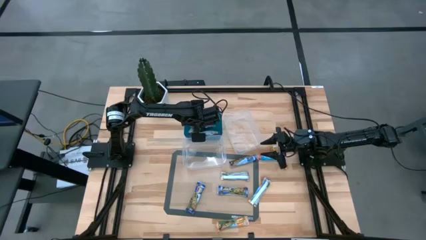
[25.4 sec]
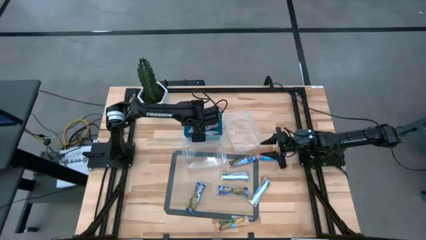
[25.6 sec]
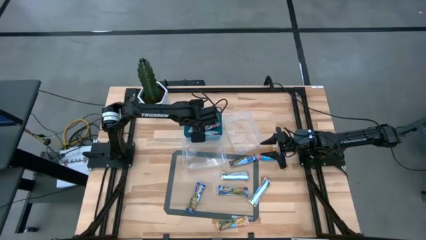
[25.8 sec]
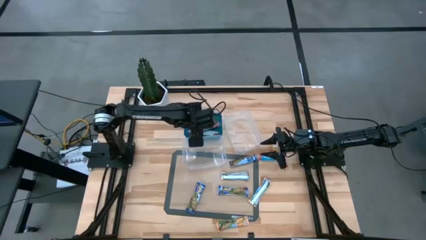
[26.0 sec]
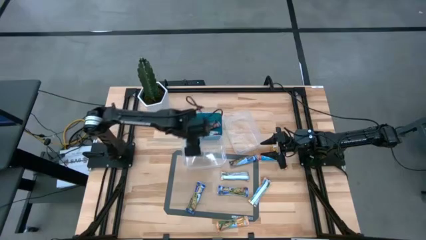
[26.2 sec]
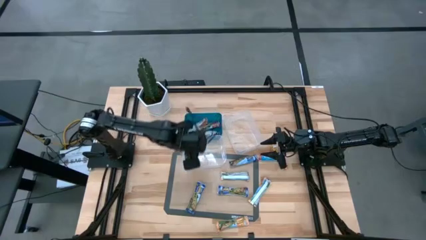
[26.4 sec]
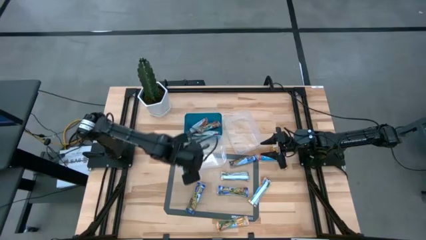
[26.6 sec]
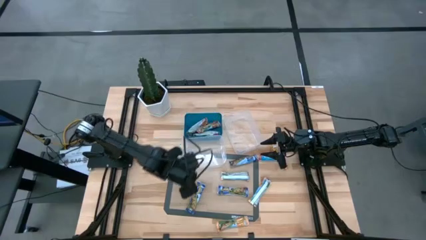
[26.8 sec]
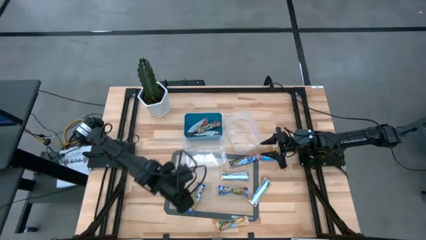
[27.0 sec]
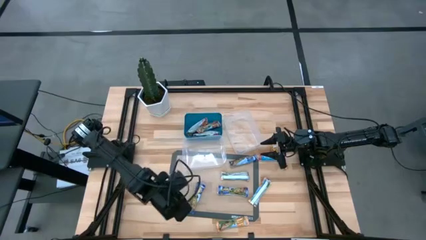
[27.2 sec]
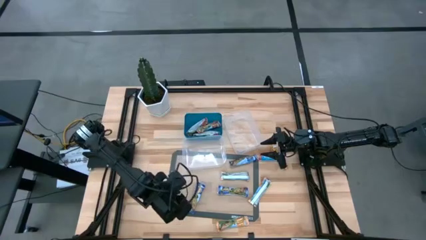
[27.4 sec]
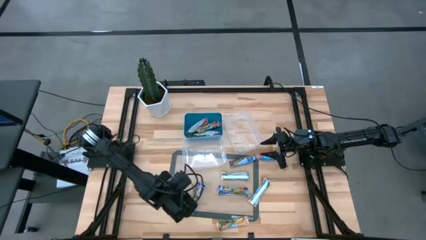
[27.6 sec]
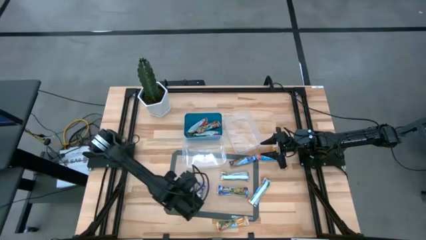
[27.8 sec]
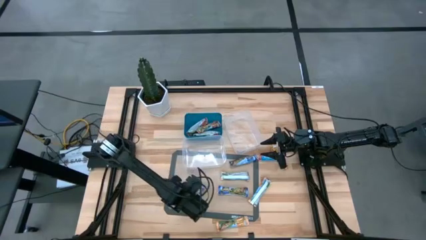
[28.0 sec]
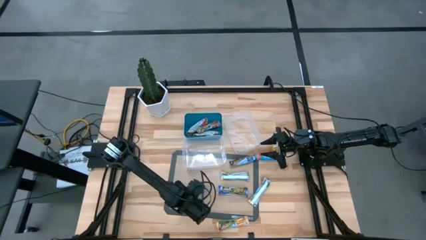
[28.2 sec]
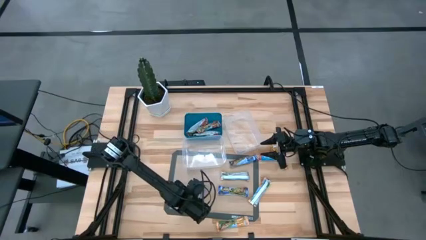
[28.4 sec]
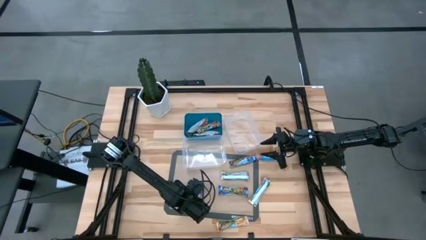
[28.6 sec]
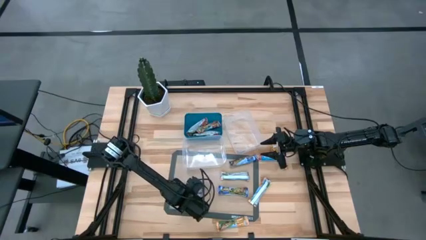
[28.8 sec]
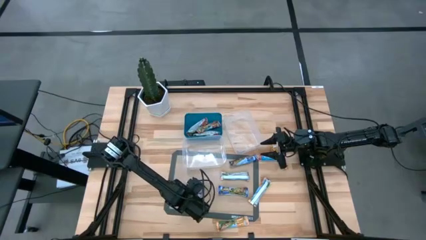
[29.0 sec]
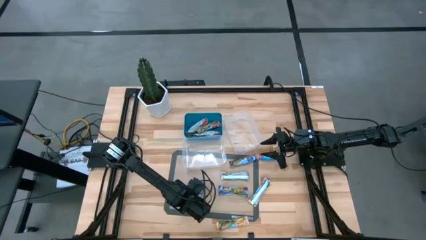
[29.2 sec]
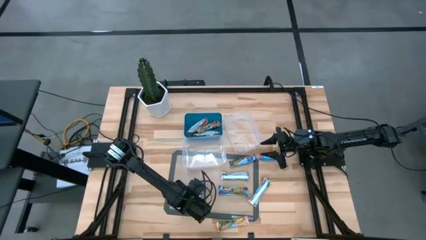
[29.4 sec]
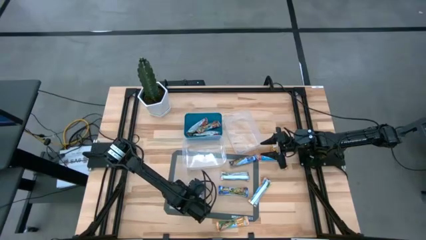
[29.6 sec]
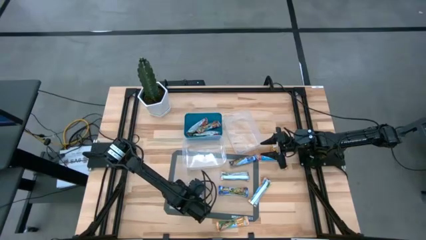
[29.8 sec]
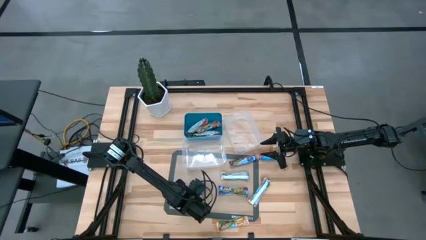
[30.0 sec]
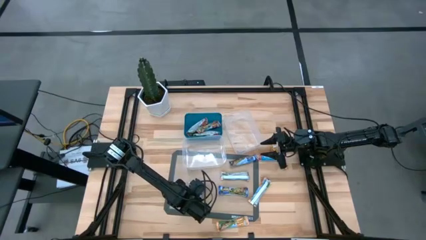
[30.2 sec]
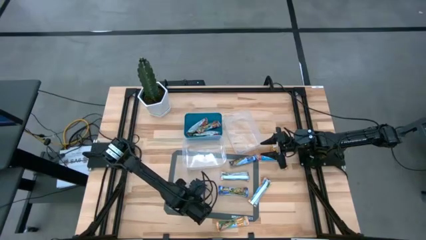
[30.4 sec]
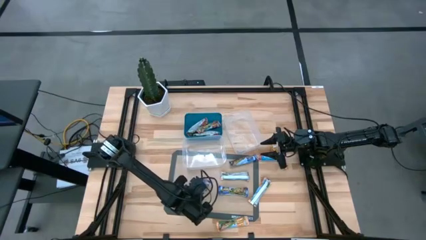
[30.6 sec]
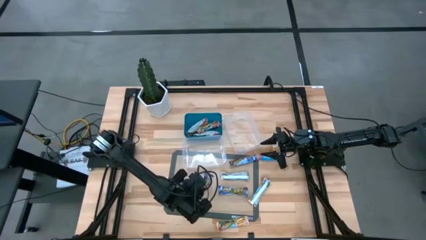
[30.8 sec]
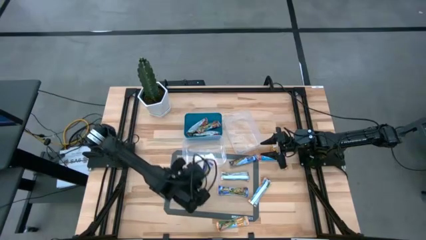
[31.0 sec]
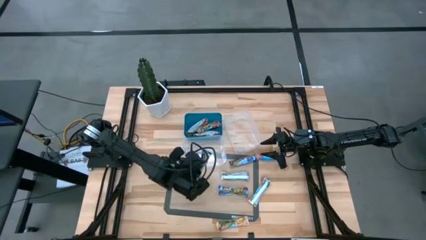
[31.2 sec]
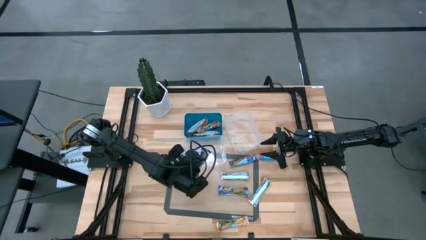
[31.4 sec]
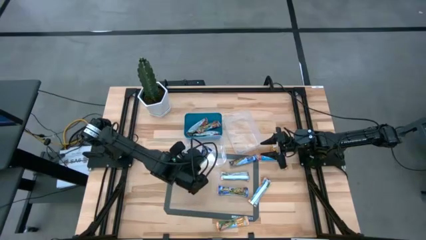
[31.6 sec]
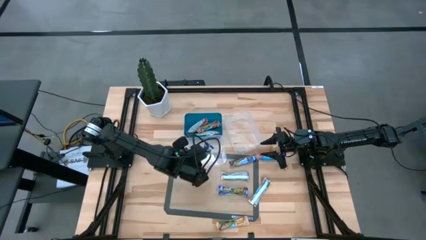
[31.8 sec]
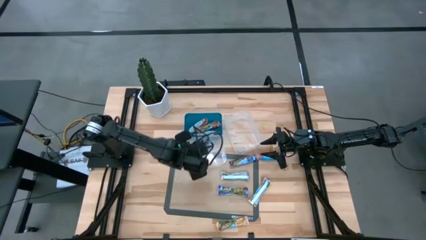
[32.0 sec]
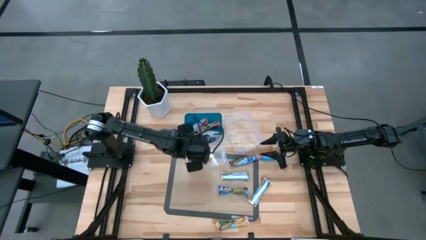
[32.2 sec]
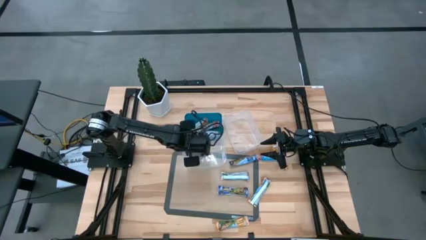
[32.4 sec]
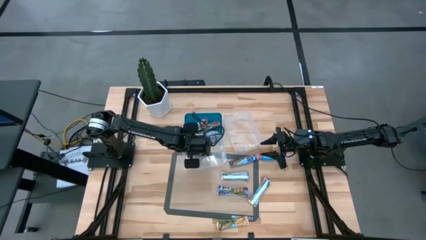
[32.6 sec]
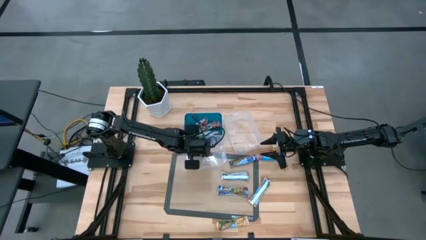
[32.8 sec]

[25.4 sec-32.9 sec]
Task: Pick and place Granola Bars by type
Put the blue granola bar into the left transparent bin

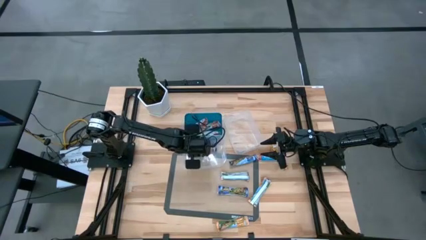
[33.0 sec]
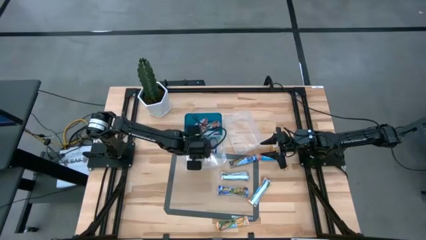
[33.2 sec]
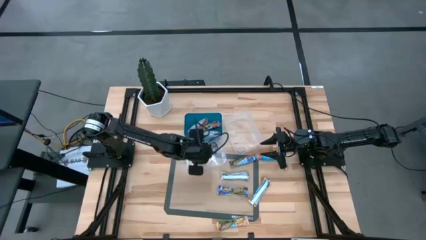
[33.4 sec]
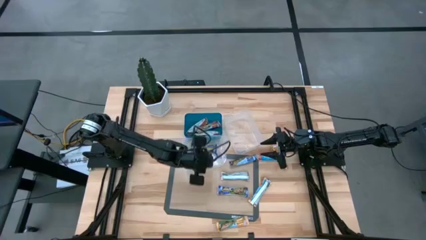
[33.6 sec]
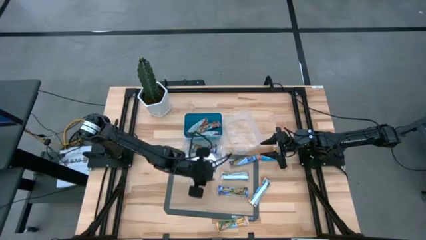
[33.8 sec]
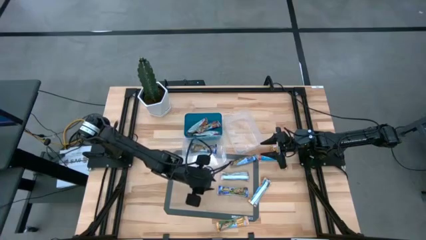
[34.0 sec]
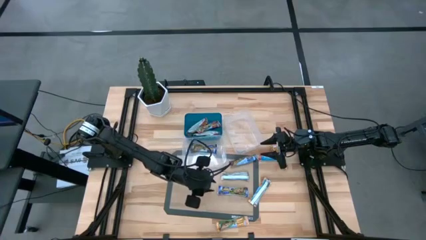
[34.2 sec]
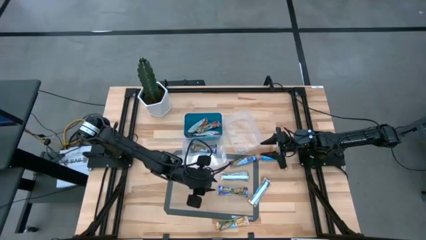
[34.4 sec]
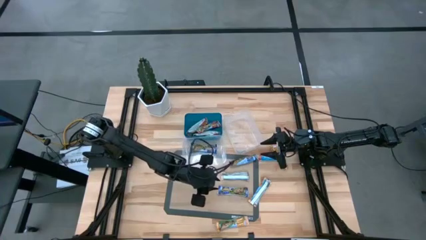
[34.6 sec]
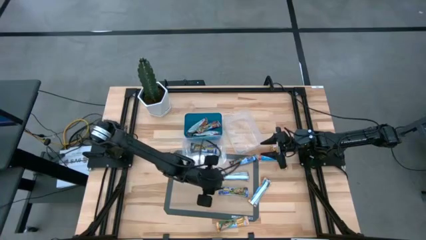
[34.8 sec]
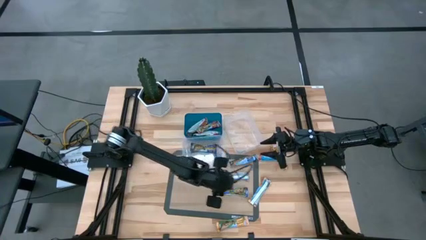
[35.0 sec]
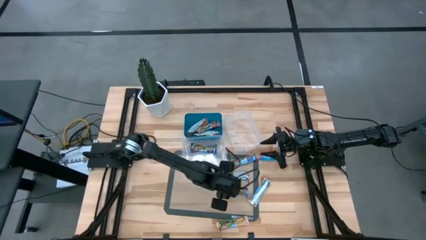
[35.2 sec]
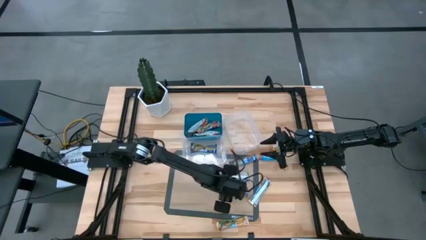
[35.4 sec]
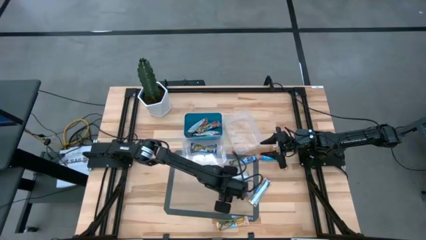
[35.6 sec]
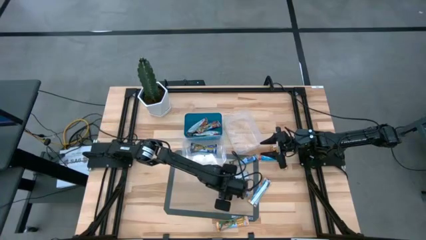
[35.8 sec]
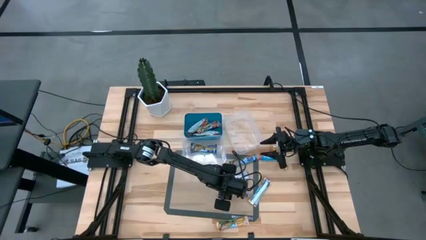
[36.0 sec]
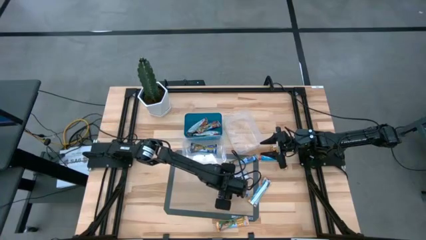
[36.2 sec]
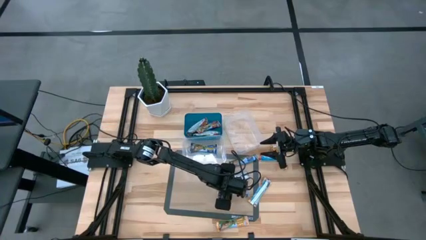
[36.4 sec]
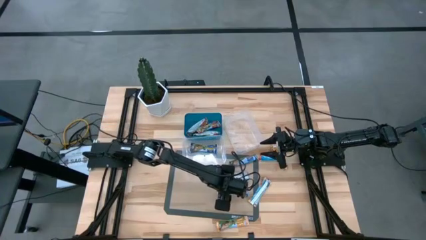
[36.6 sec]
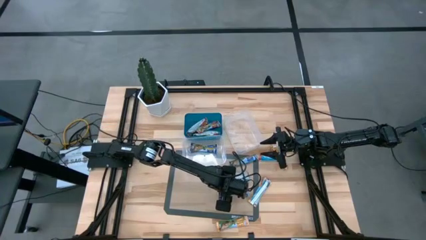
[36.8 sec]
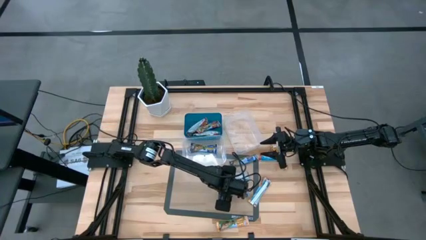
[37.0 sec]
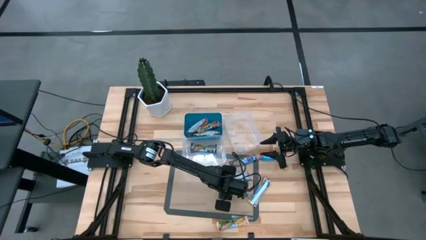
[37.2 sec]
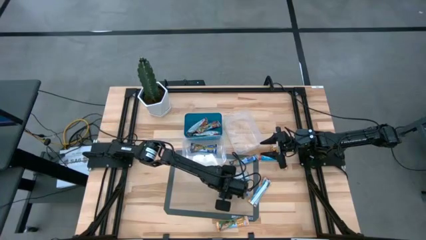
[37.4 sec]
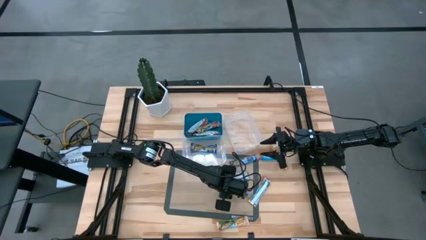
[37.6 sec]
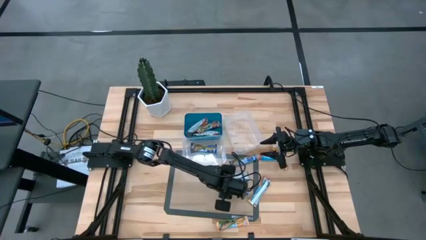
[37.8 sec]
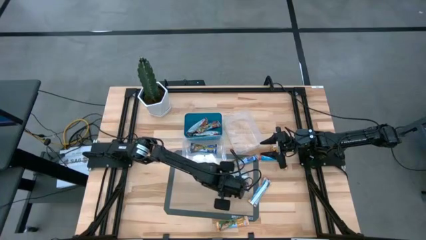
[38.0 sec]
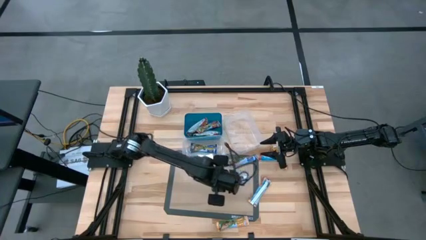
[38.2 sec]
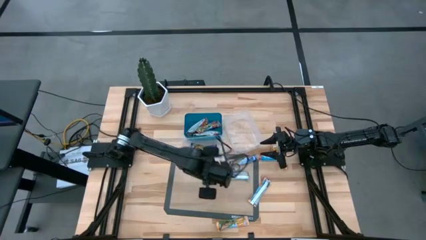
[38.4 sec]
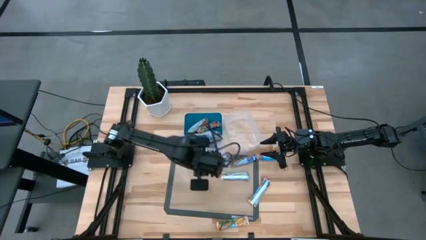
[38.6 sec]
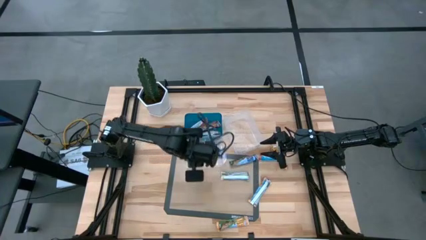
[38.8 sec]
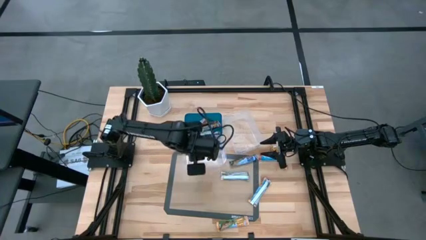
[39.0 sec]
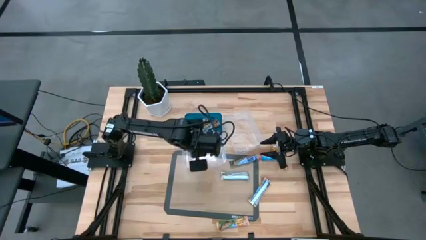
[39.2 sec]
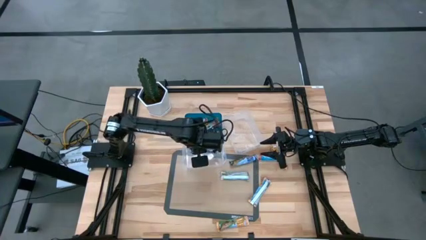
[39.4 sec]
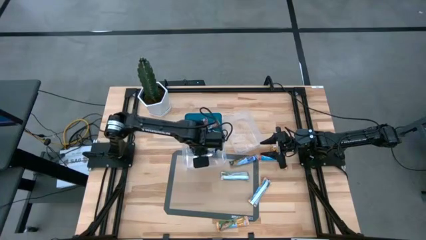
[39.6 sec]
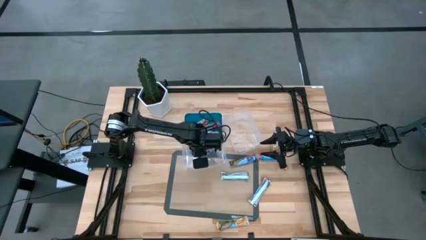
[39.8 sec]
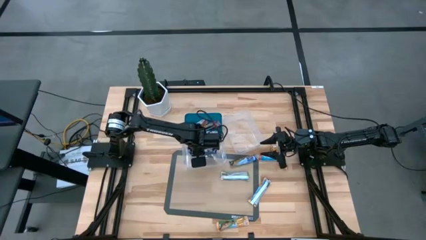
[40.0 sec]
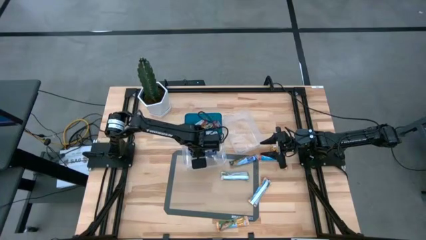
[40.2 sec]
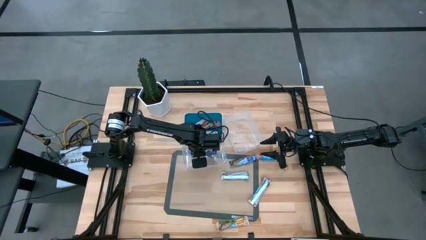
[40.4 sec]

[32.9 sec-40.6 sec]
Put the blue granola bar into the left transparent bin

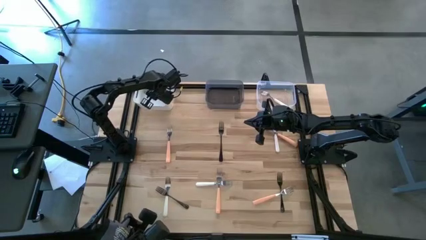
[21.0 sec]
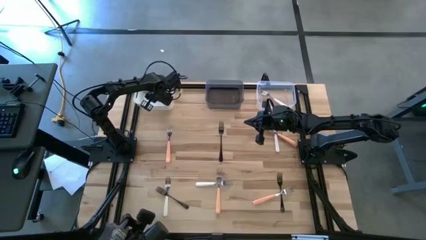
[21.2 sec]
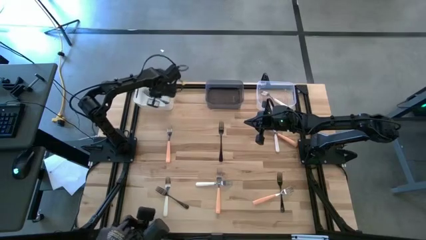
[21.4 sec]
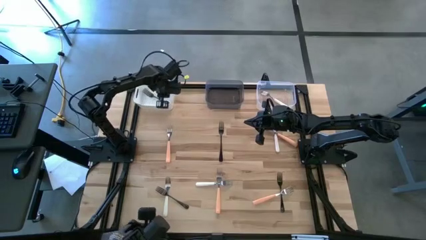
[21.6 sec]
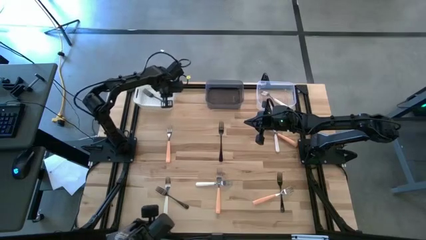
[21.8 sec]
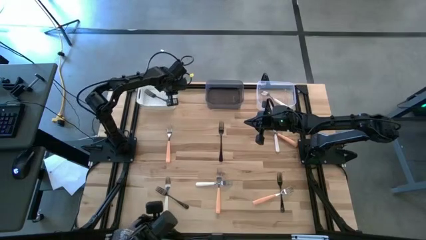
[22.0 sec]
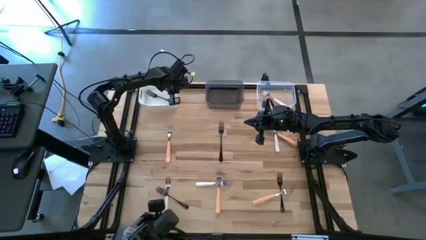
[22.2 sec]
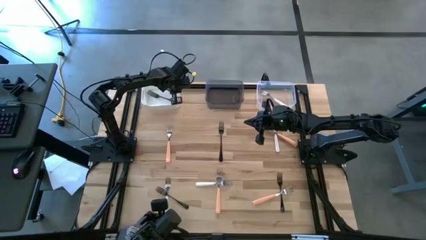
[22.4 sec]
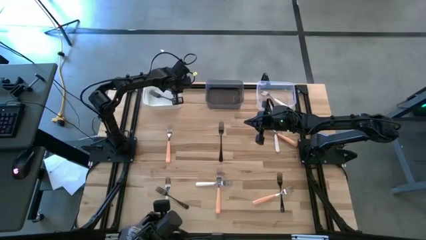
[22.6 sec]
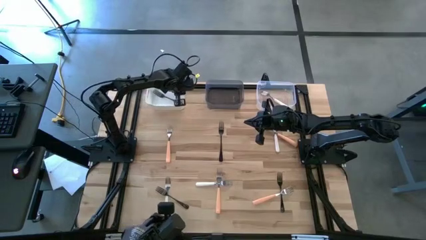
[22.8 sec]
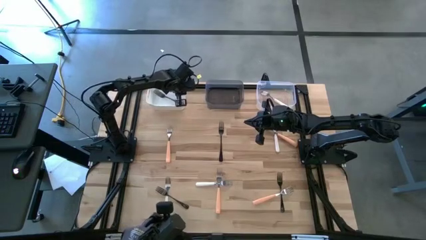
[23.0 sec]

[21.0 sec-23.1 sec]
Task: Sort silverware by color (type)
Adjust the white bin
